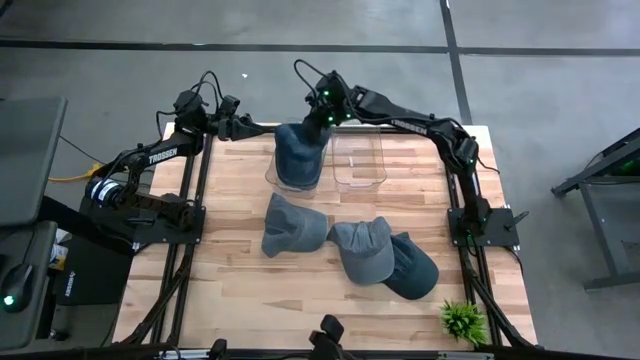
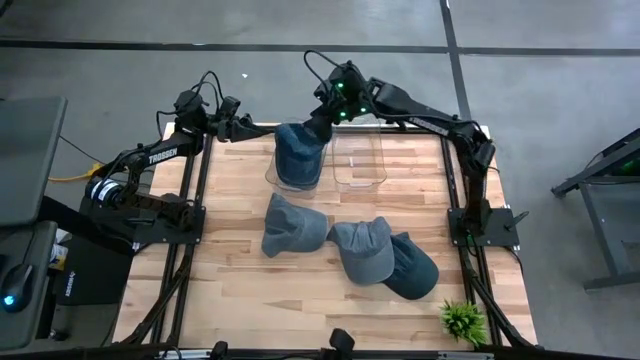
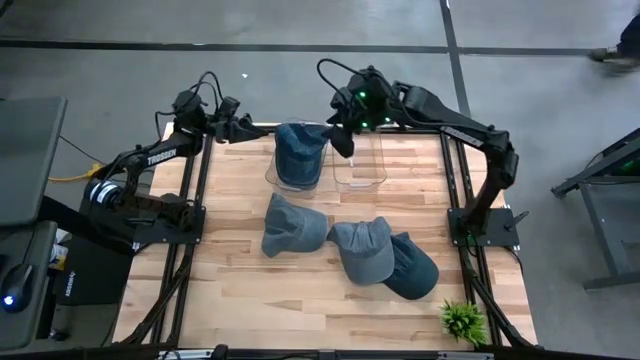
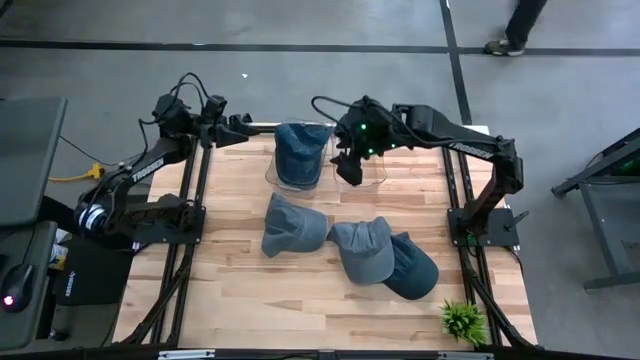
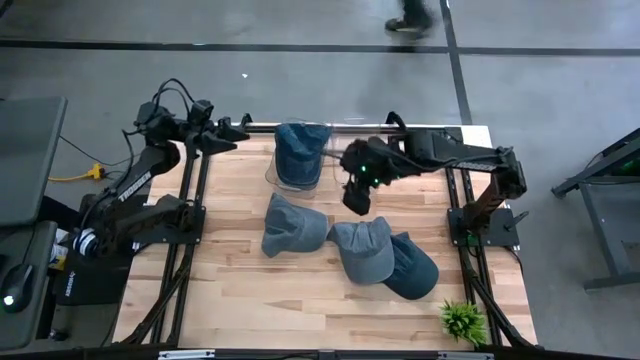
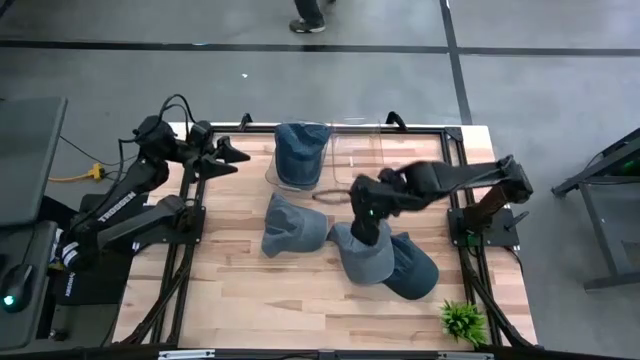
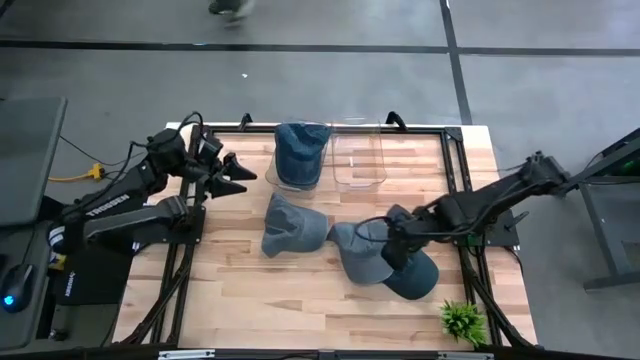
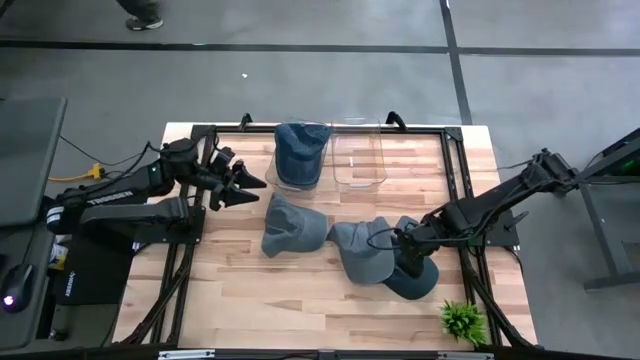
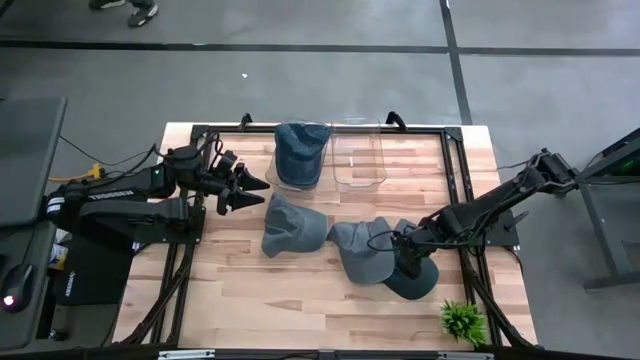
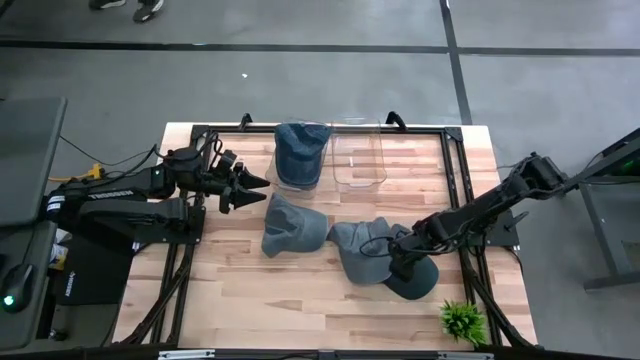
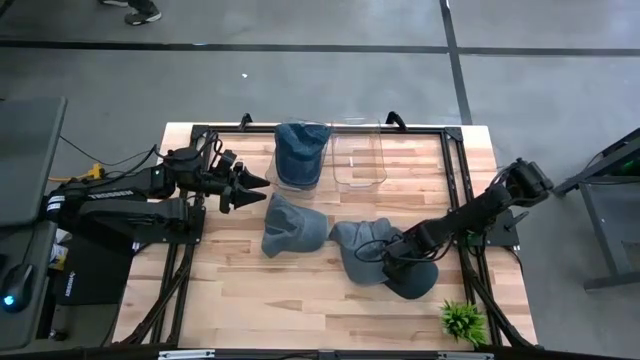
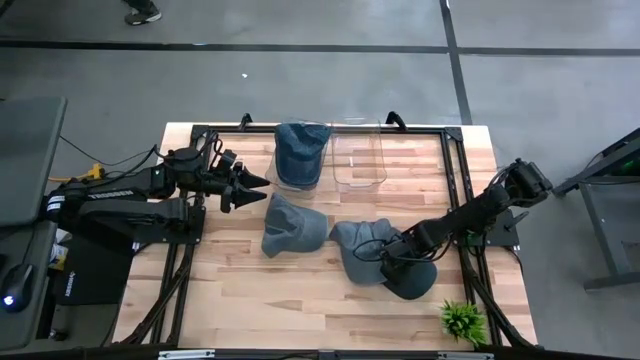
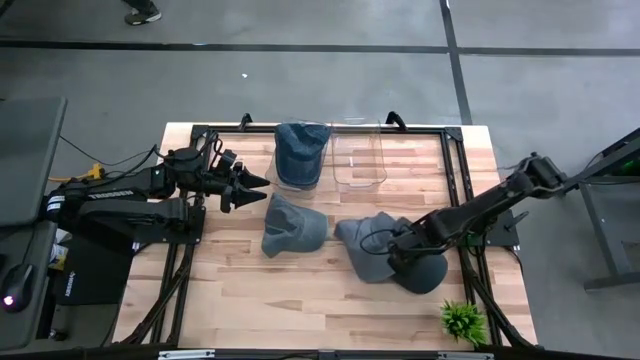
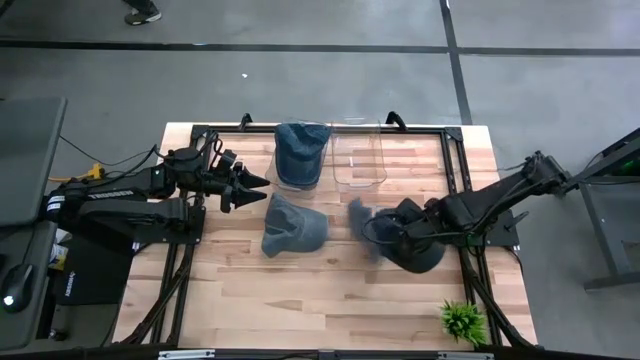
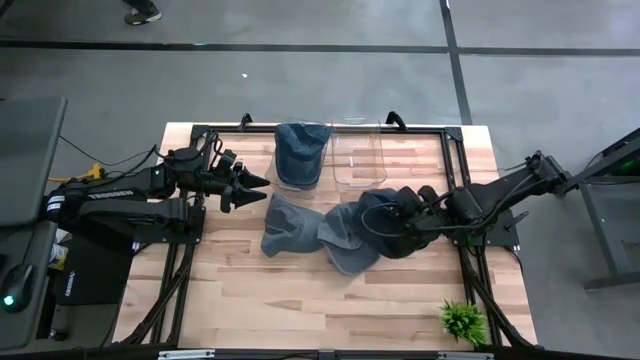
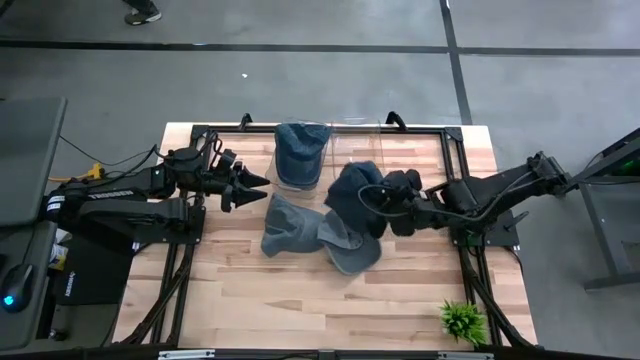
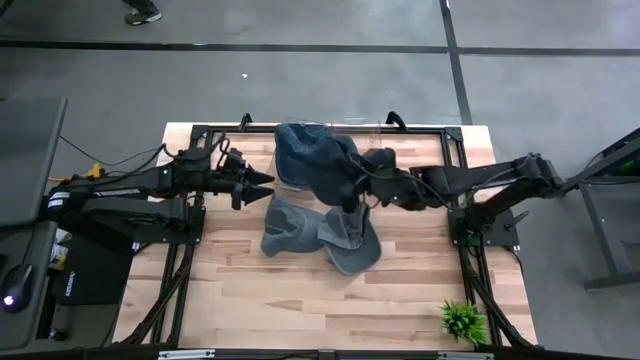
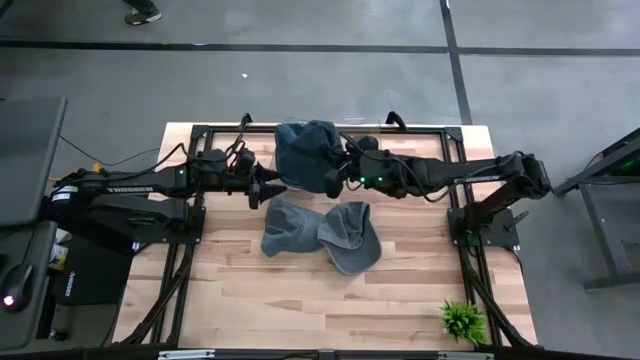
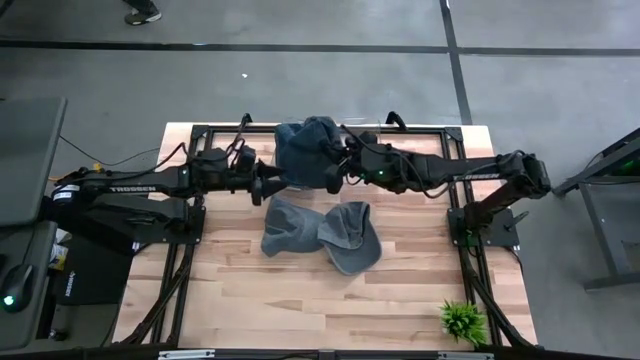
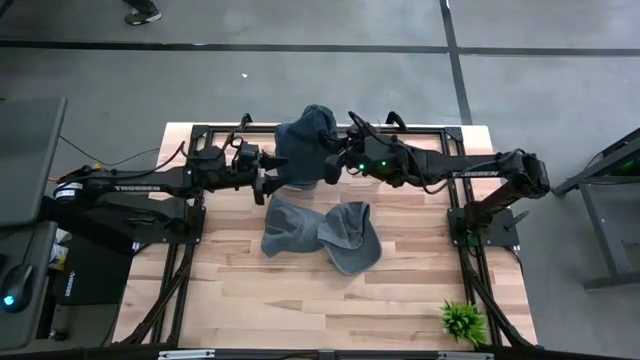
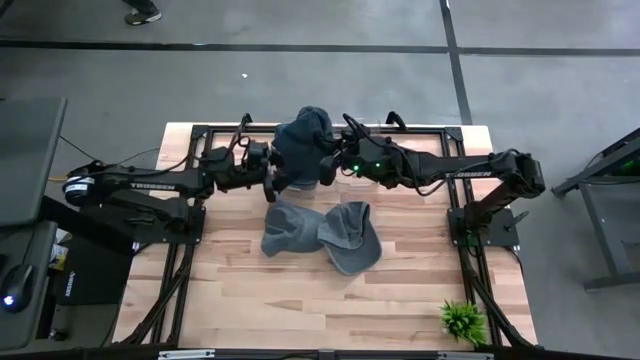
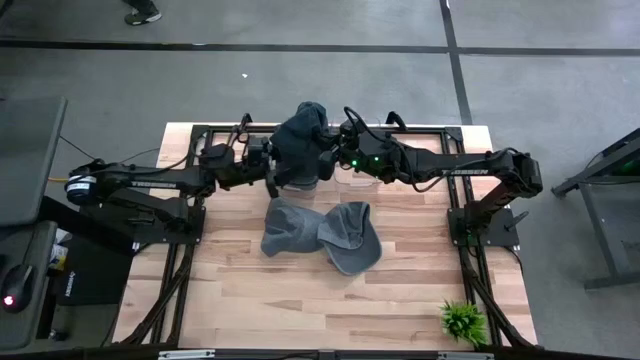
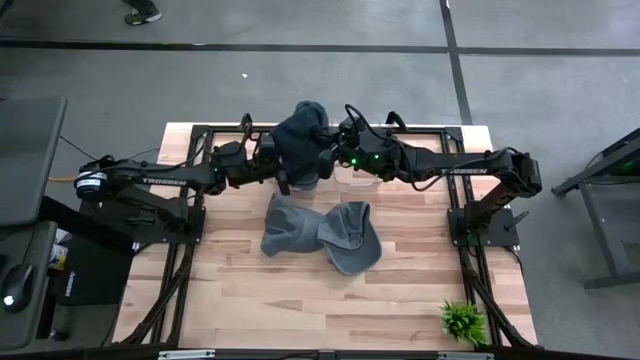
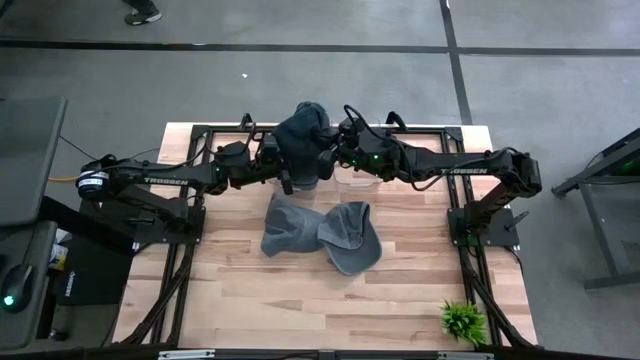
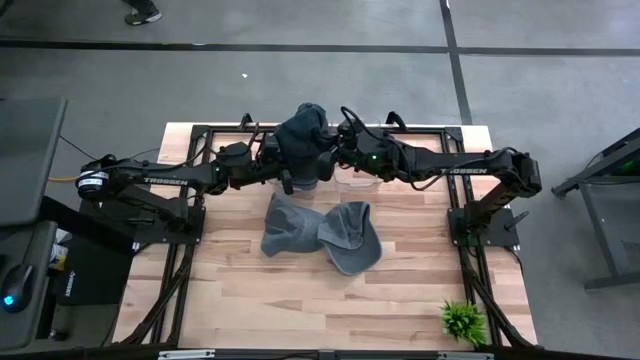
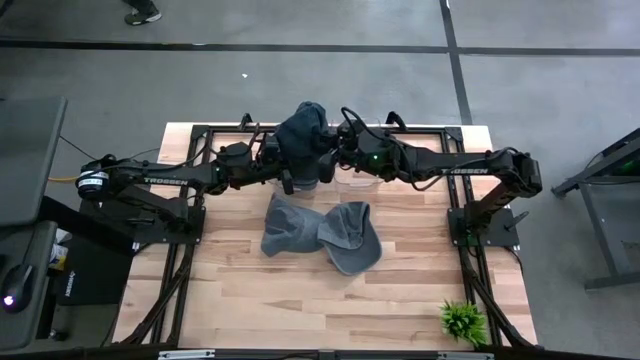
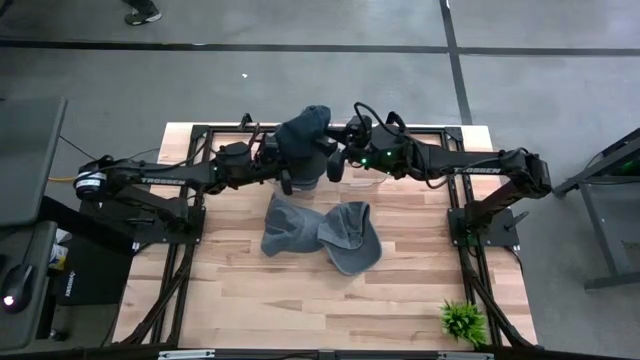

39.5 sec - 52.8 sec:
Task: Pick & Place hat
Put the blue cap into the left transparent bin

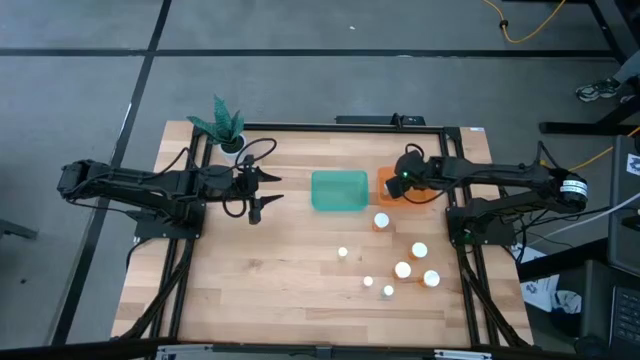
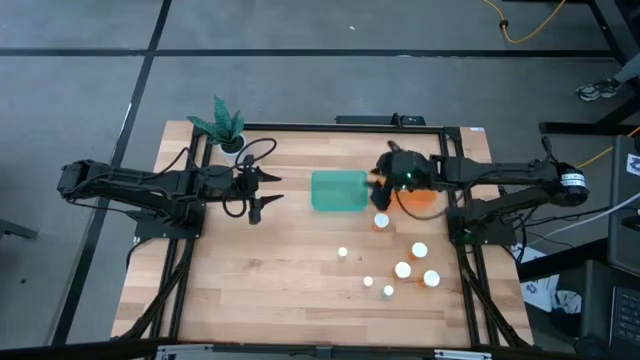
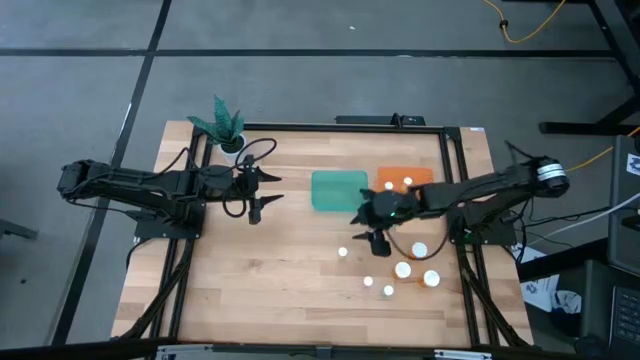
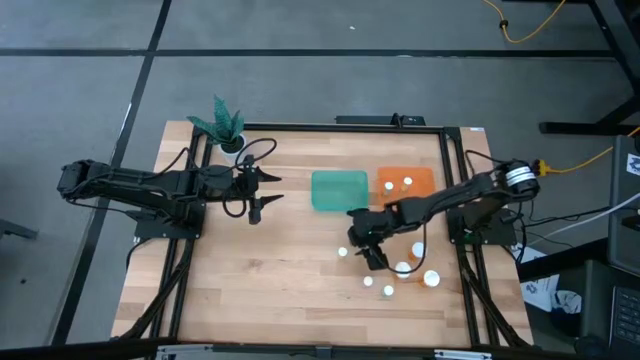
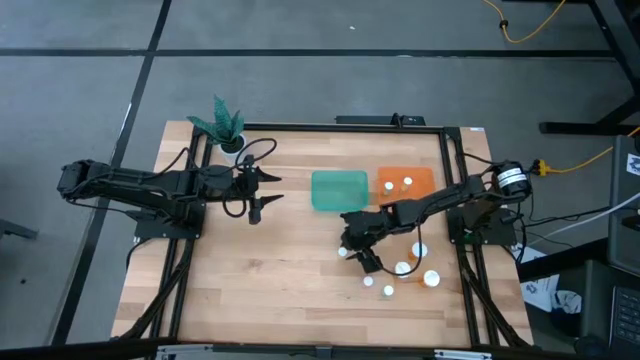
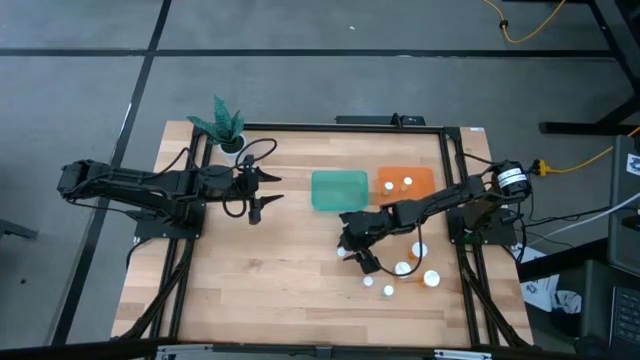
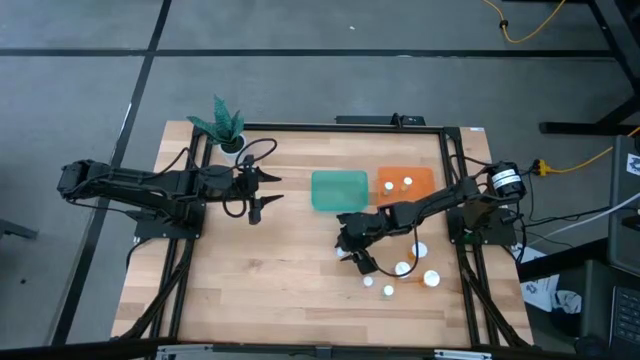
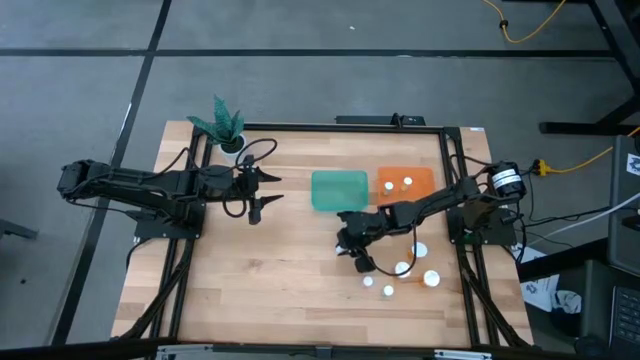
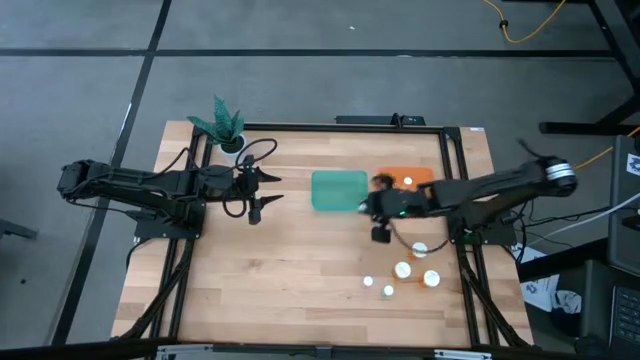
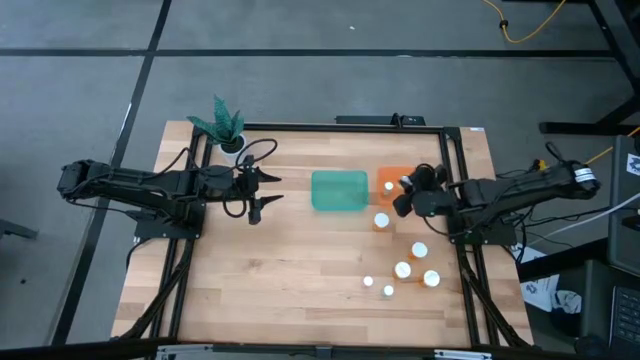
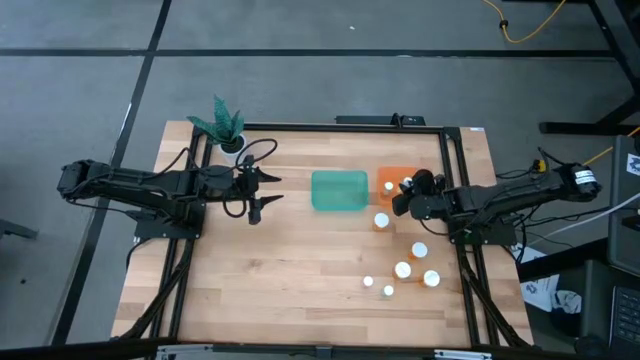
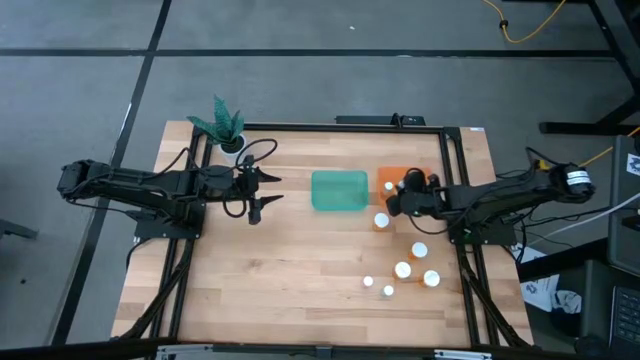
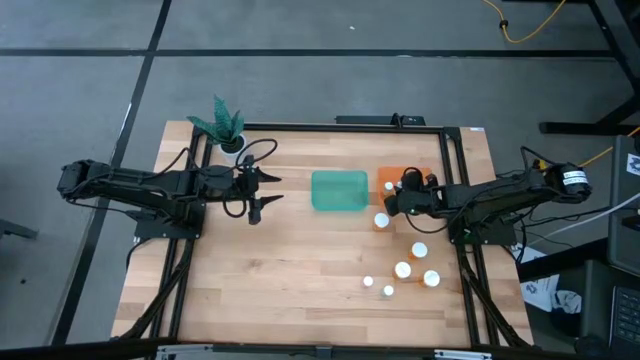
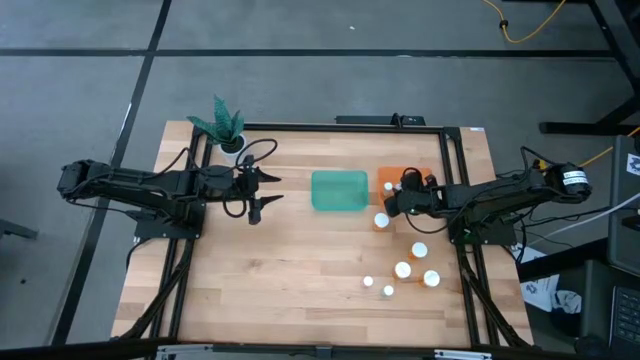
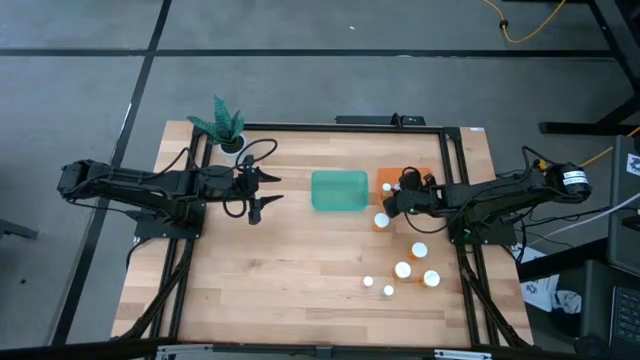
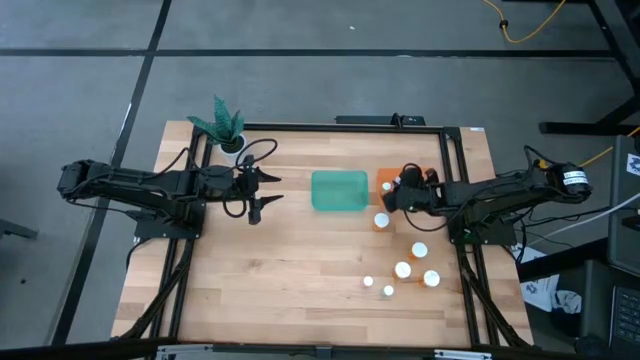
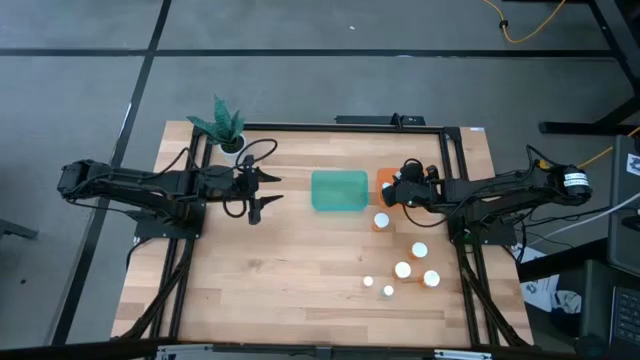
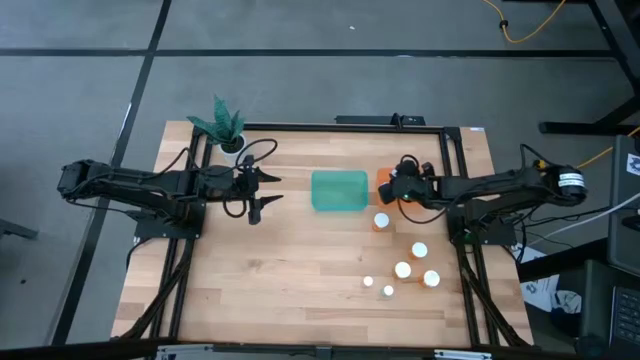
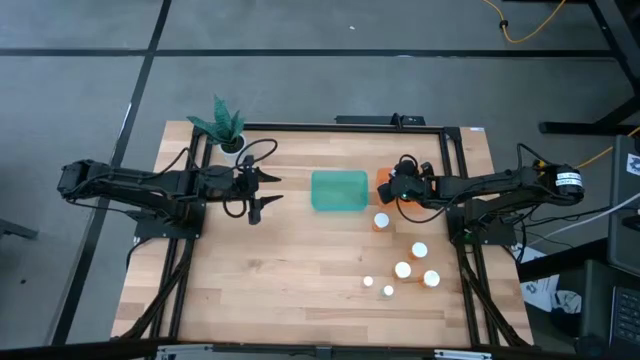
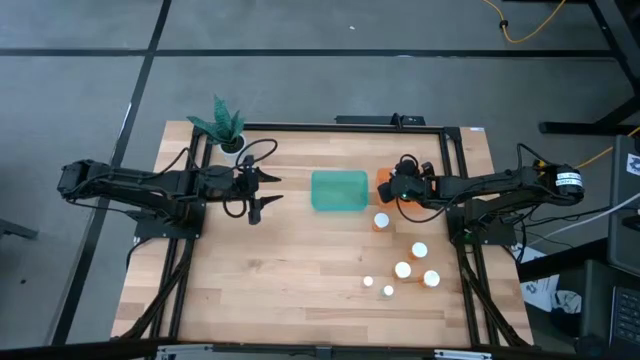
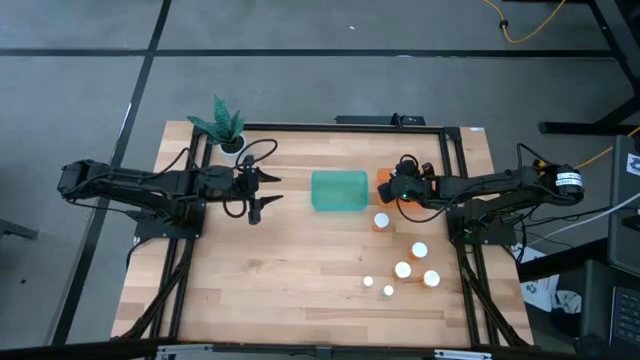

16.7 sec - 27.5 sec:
Task: Pick and place medicine bottles into bin by pill shape (circle, oval)
Put the yellow pill bottle into the orange bin
